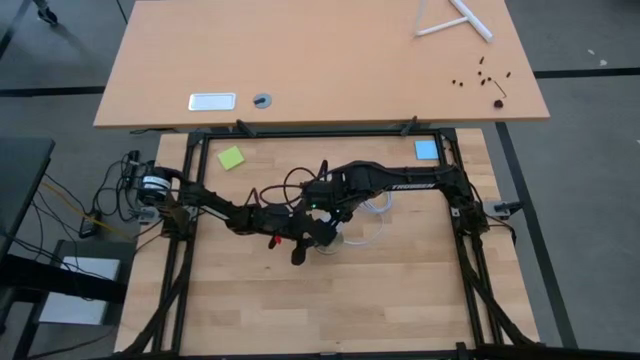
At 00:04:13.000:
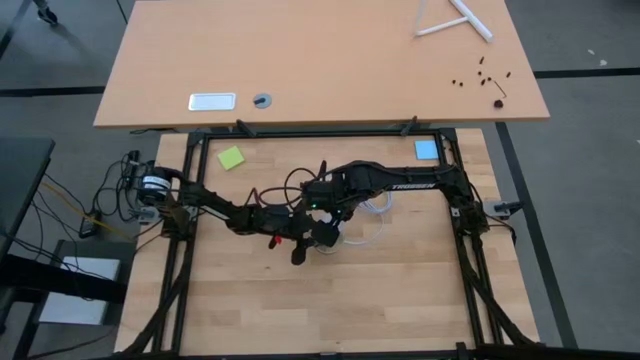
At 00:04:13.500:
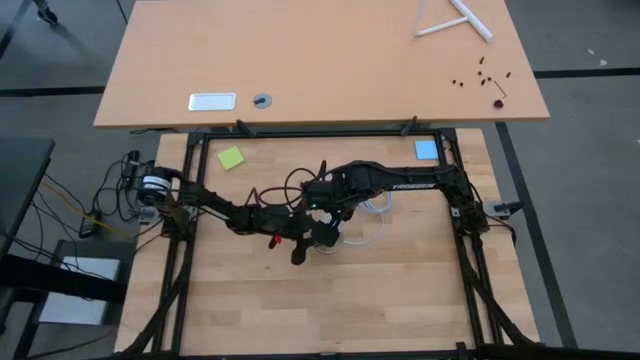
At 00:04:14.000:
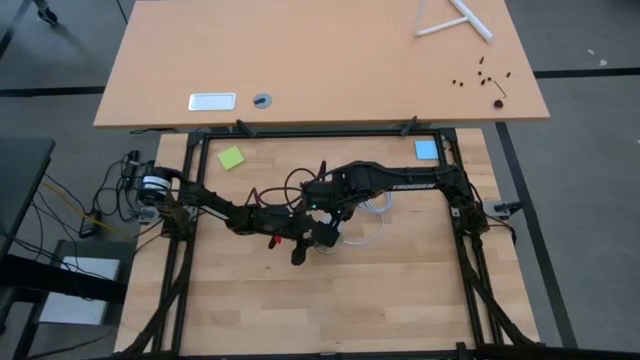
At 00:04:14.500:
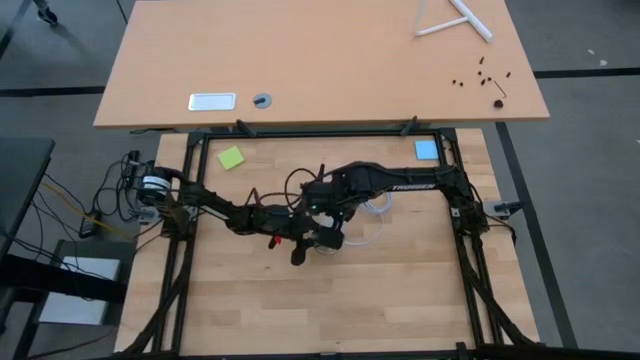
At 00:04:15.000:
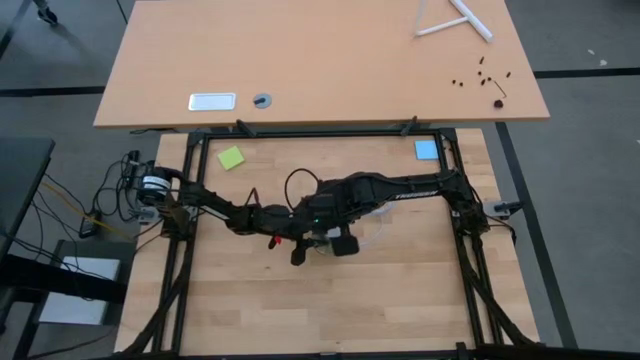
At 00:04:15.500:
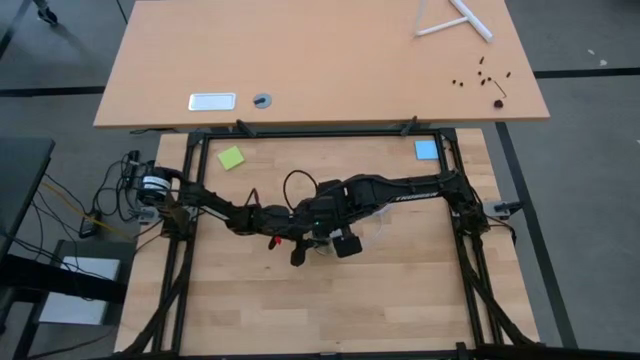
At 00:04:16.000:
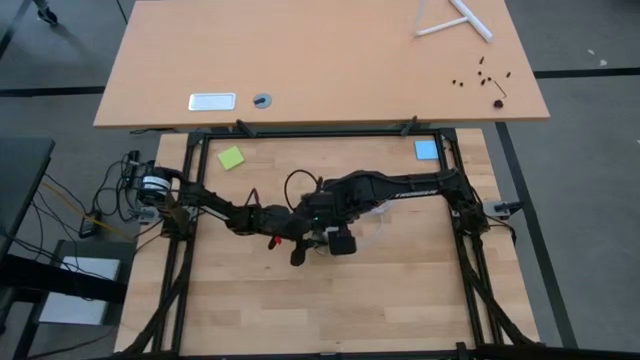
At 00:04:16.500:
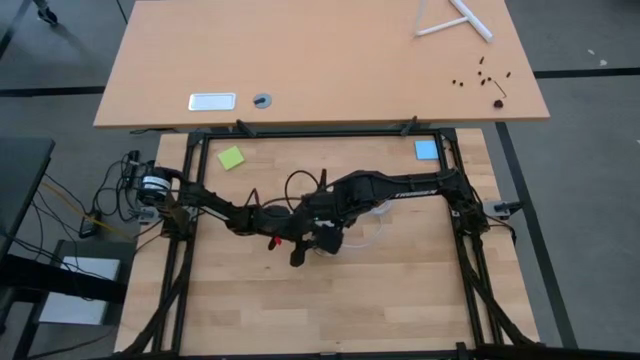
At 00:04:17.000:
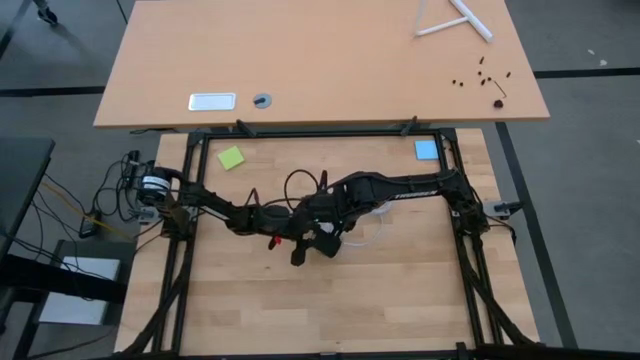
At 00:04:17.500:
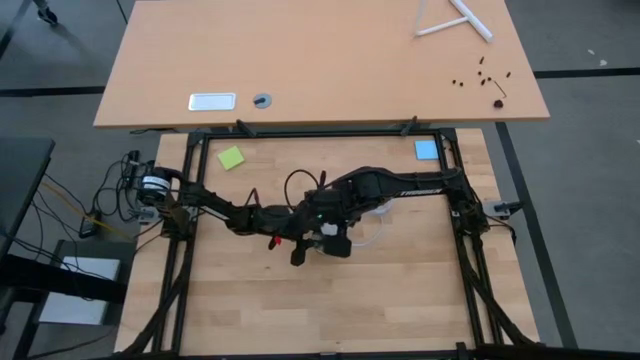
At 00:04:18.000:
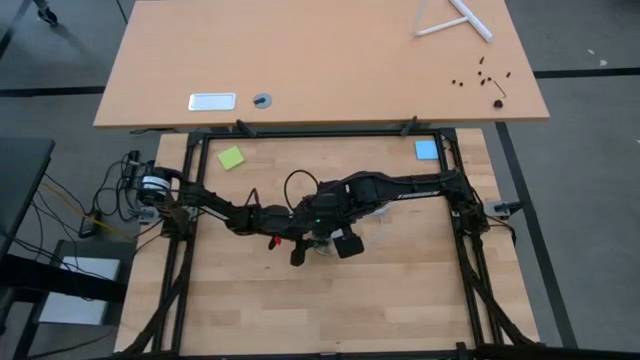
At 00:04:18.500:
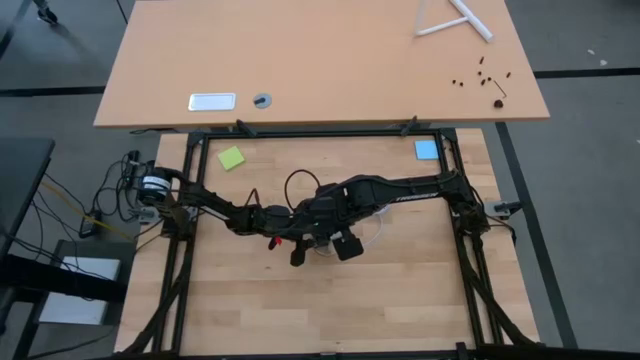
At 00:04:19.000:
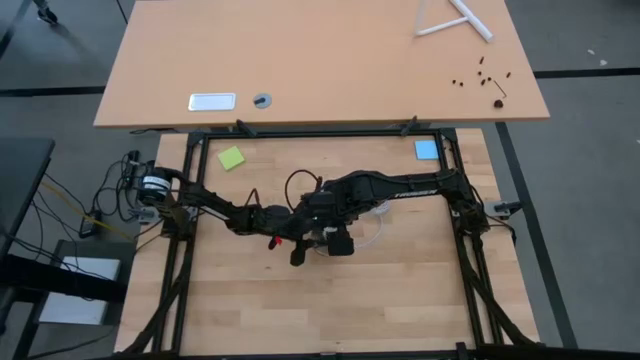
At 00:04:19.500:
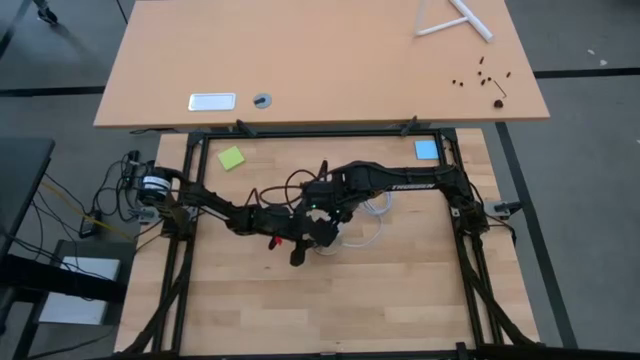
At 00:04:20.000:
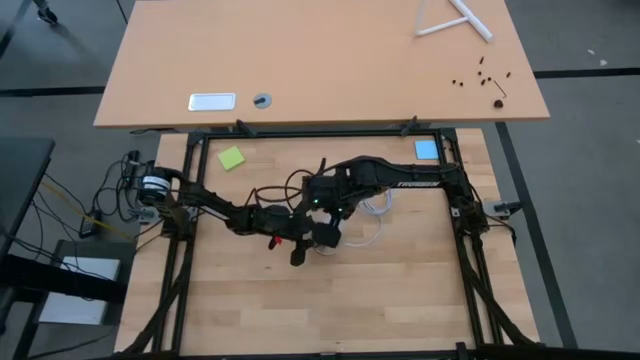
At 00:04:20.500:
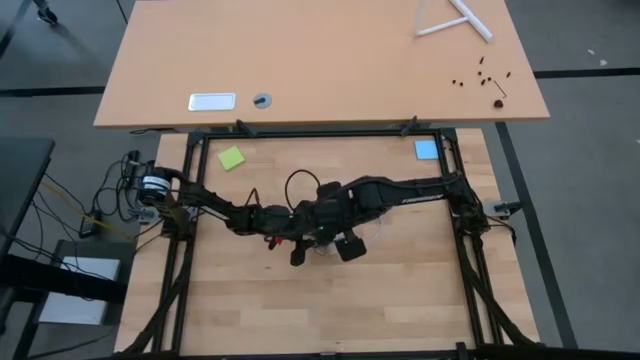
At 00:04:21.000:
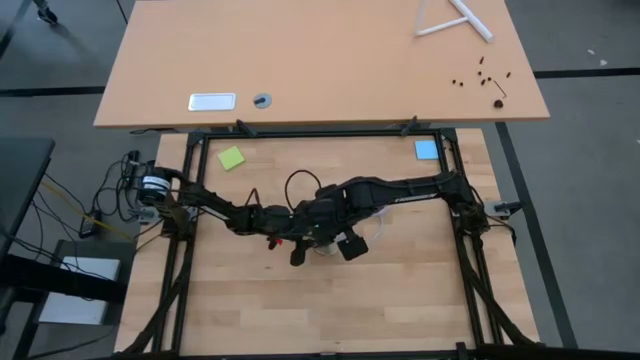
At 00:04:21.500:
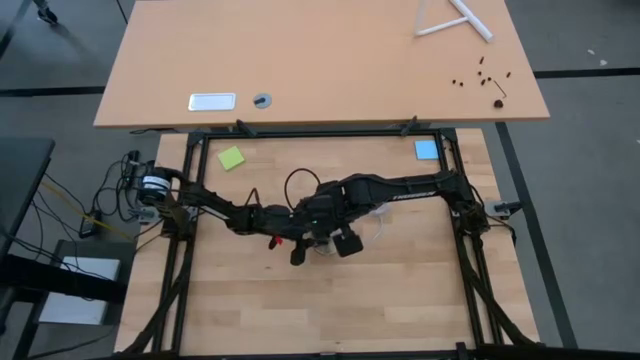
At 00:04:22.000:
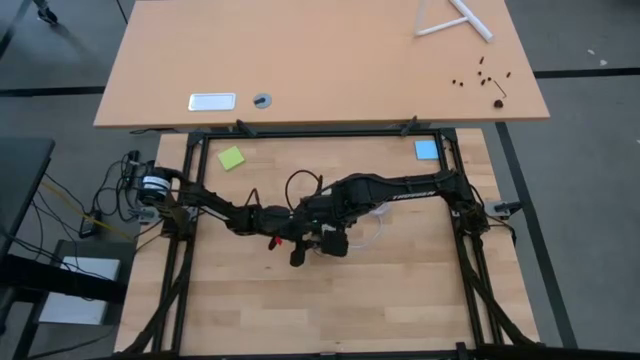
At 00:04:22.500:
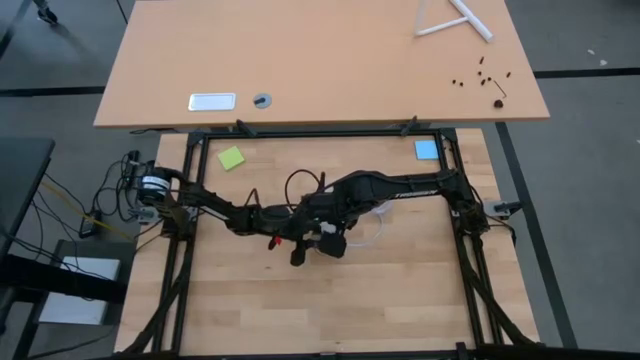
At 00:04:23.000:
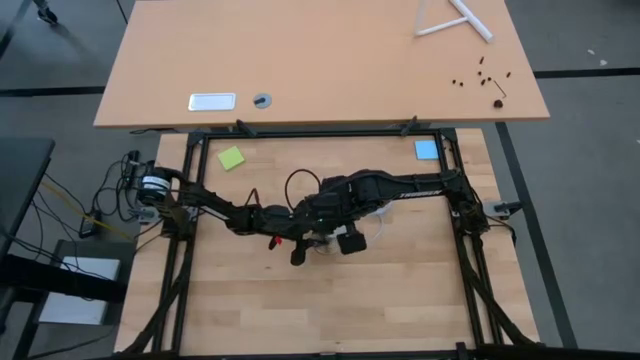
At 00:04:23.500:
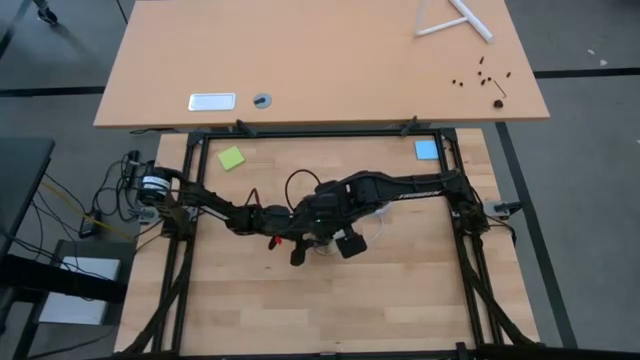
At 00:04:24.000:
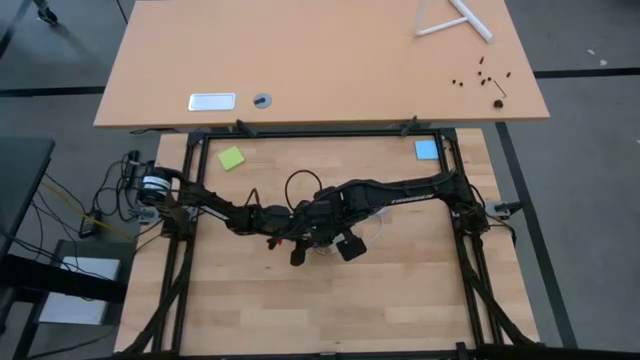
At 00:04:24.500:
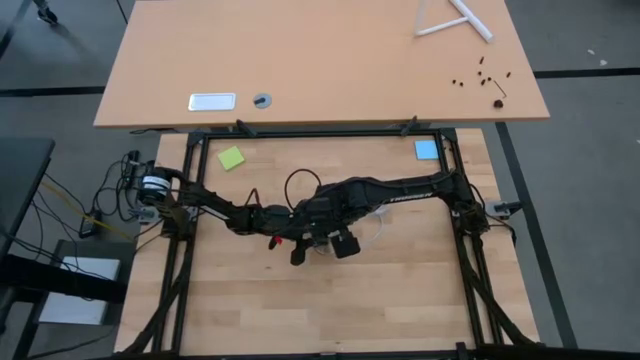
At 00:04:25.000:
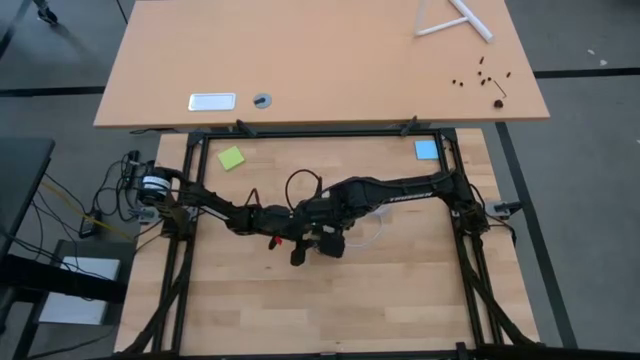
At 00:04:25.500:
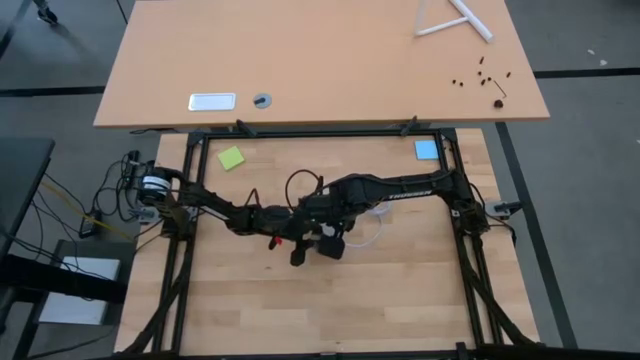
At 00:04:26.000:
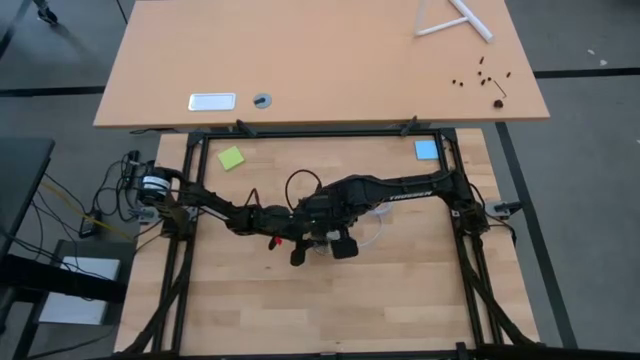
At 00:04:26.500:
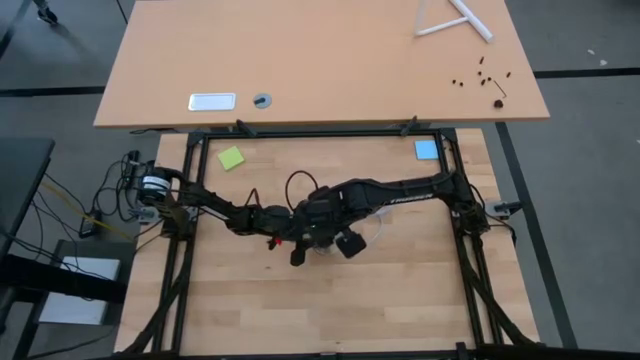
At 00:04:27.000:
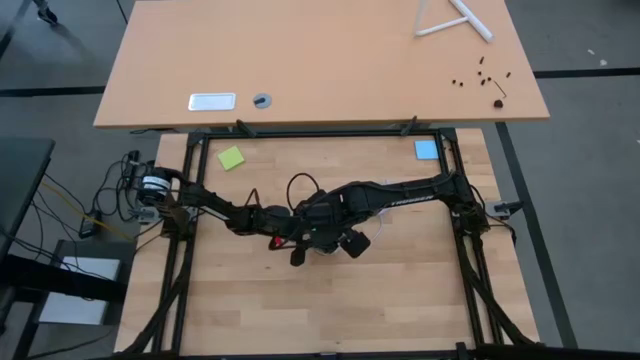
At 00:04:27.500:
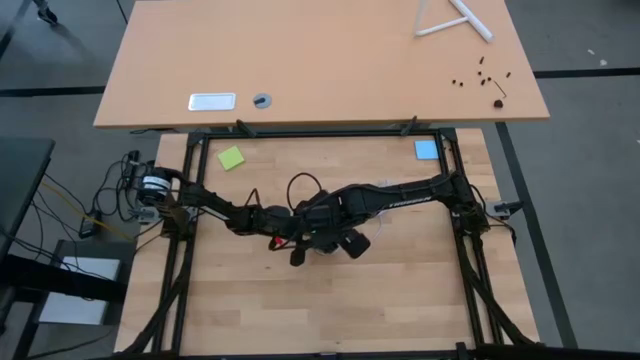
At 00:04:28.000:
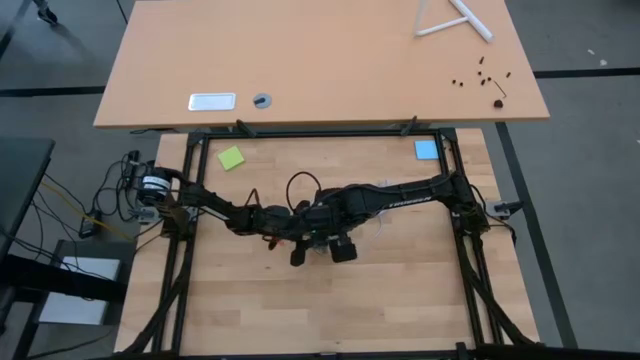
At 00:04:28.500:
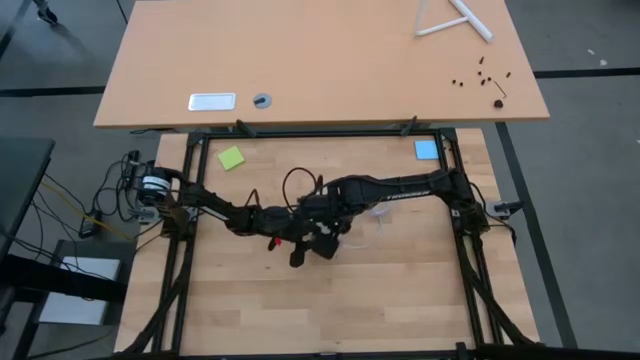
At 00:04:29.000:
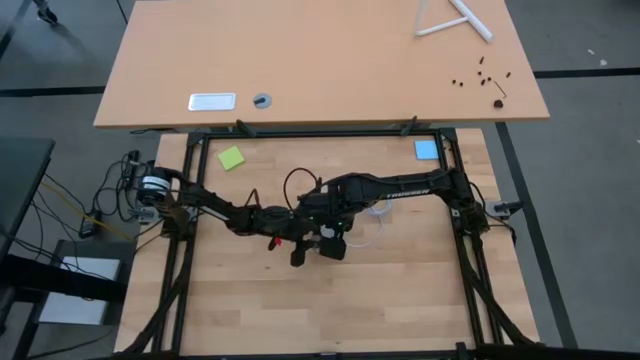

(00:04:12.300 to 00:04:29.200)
Task: Screw lightbulb
Insert the lightbulb into the lamp

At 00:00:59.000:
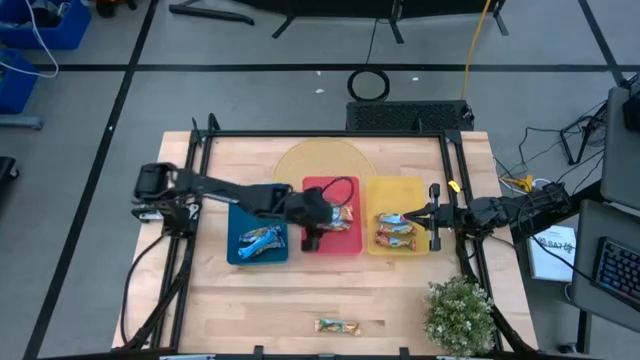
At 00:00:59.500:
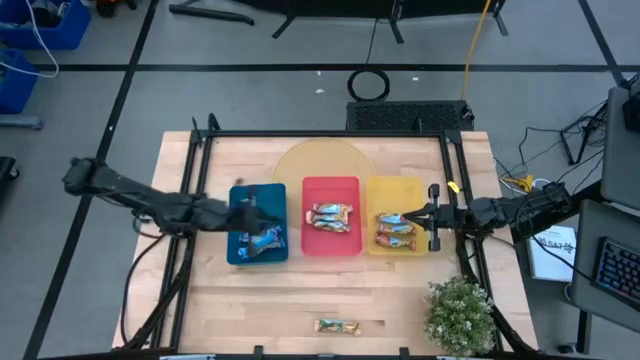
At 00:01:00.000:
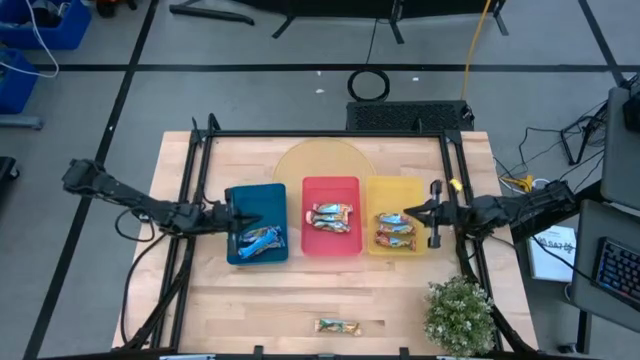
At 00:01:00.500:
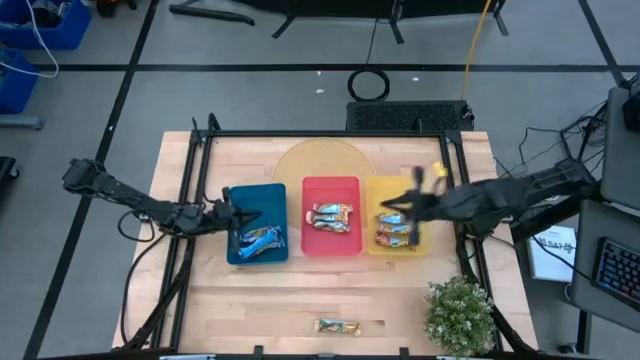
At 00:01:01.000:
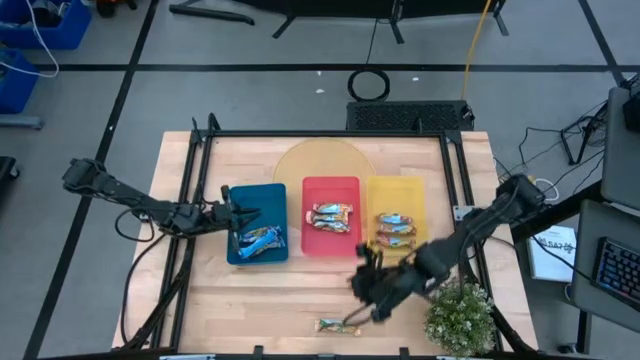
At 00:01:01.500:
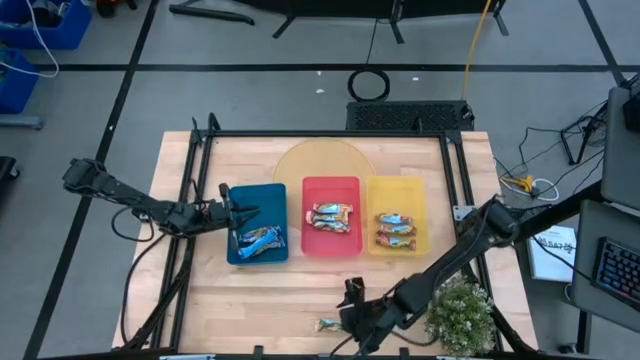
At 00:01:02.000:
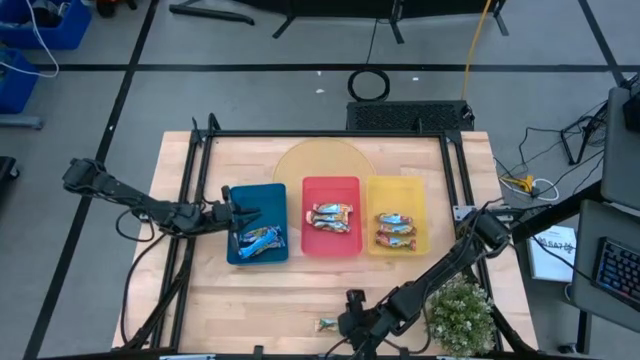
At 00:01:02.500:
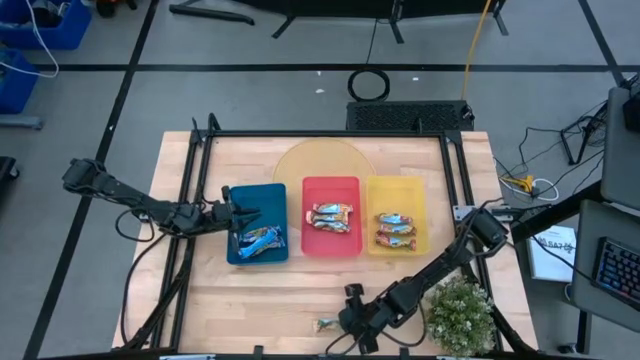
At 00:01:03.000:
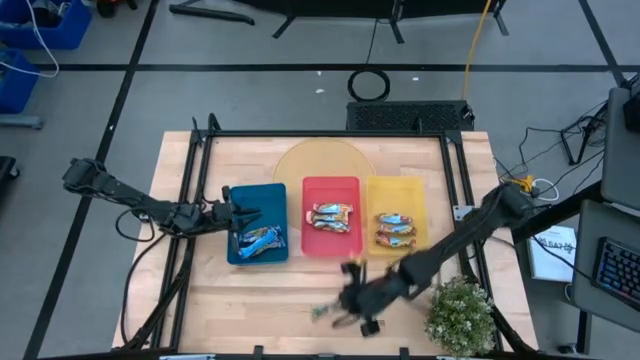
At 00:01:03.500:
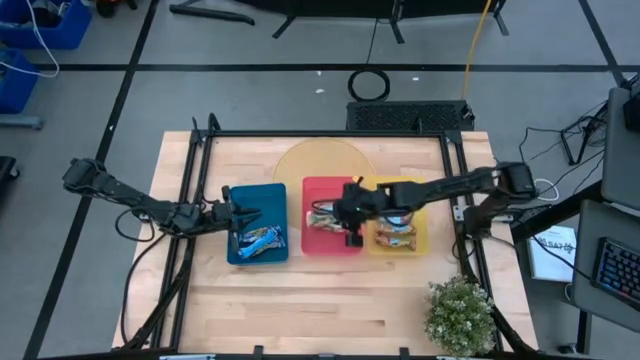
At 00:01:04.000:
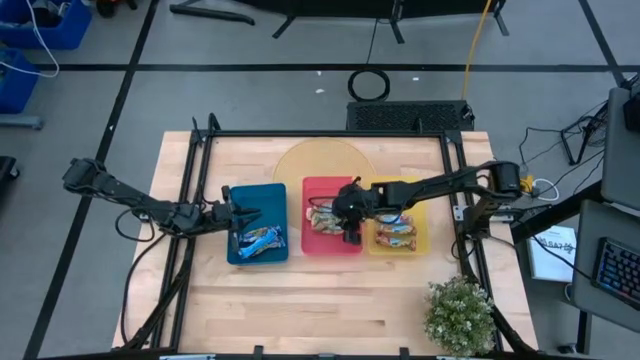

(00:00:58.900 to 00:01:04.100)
Task: Pick and place Granola Bars by type
Put the yellow granola bar into the red bin
